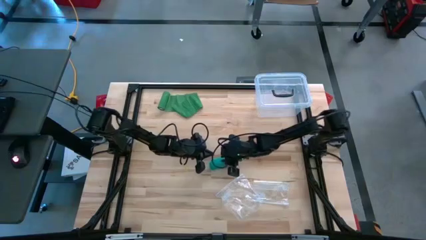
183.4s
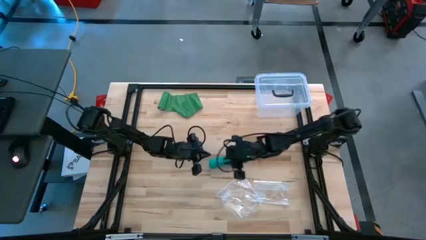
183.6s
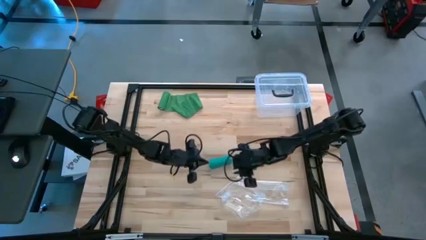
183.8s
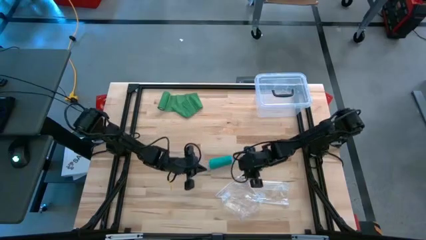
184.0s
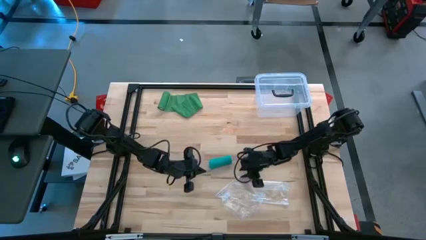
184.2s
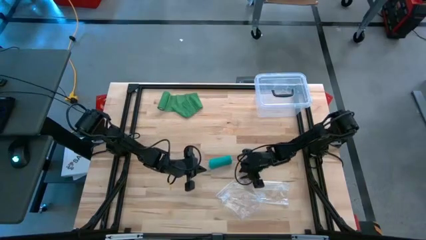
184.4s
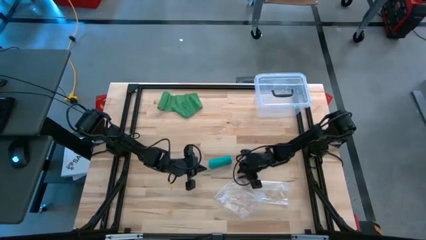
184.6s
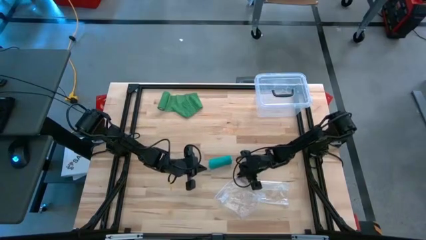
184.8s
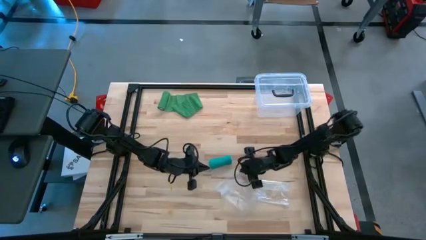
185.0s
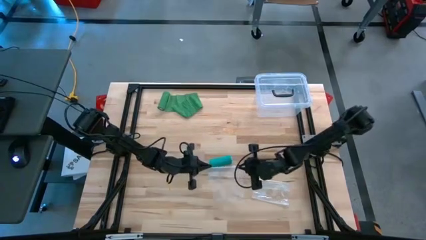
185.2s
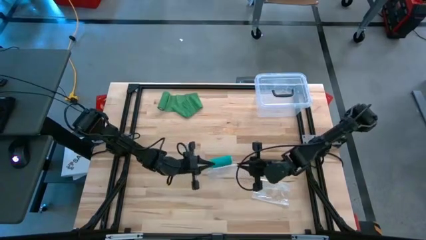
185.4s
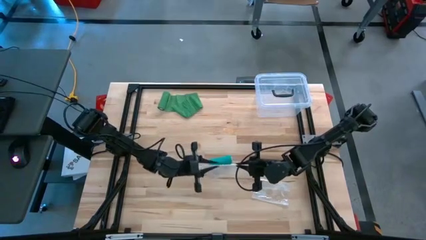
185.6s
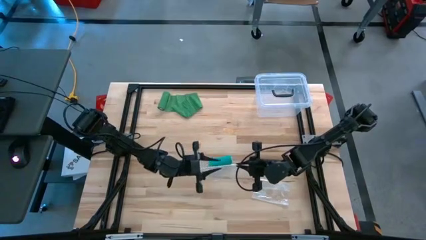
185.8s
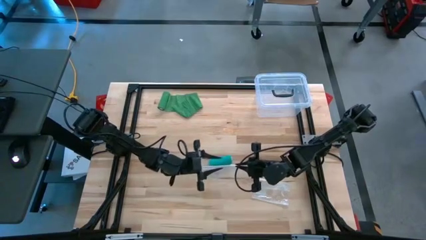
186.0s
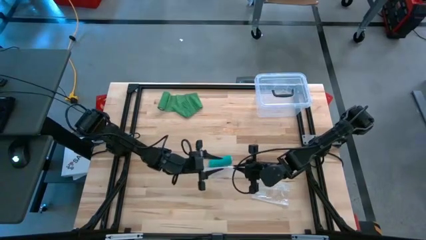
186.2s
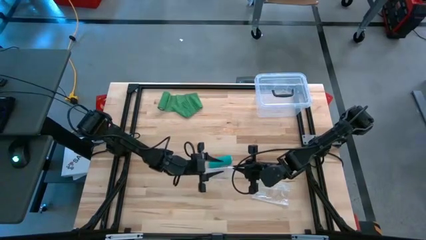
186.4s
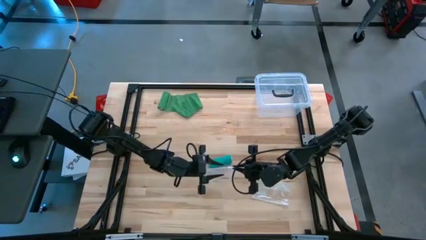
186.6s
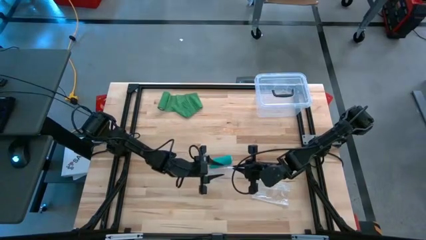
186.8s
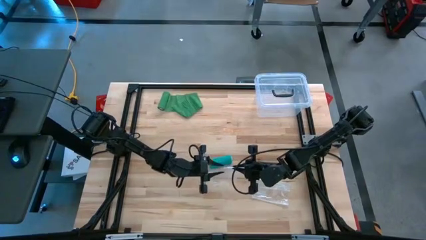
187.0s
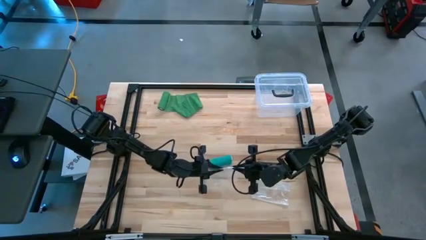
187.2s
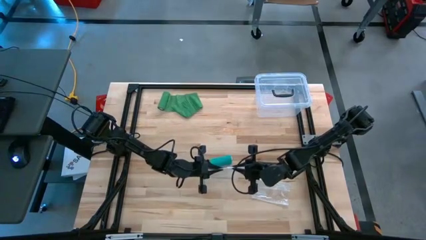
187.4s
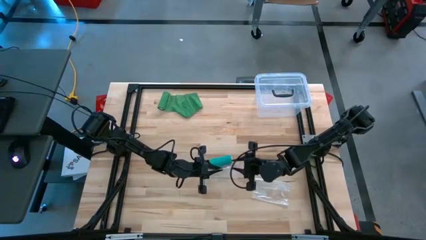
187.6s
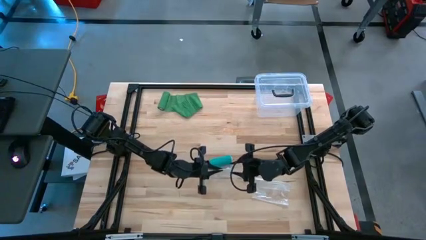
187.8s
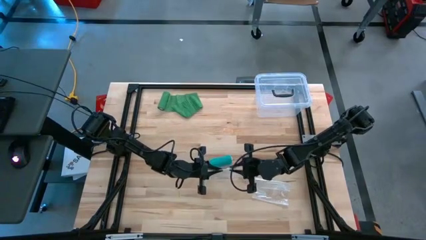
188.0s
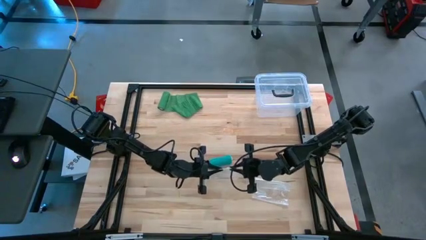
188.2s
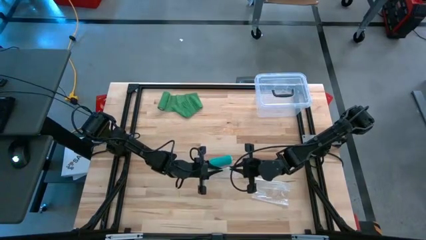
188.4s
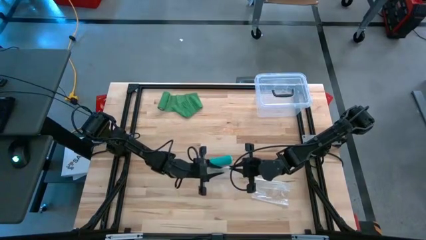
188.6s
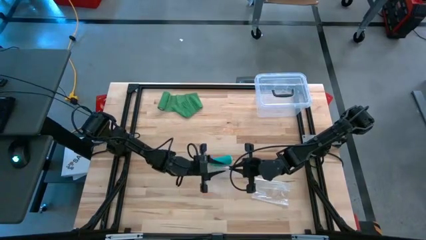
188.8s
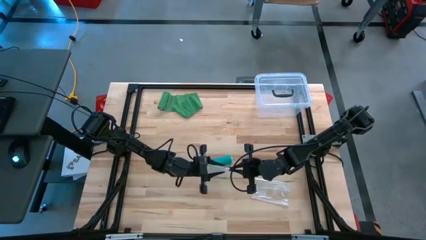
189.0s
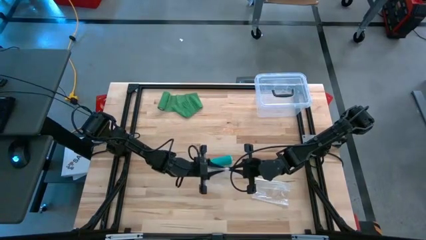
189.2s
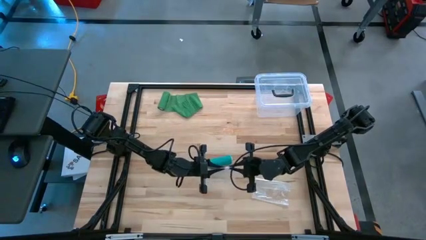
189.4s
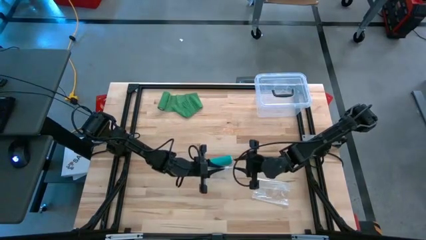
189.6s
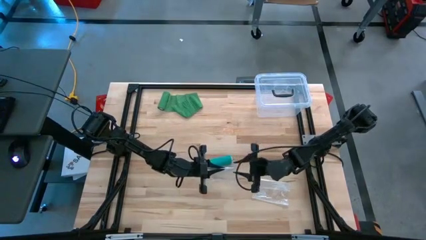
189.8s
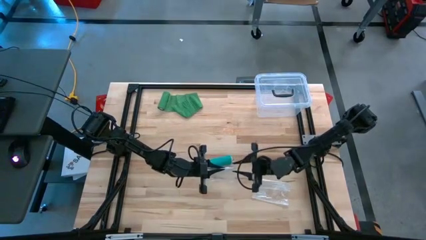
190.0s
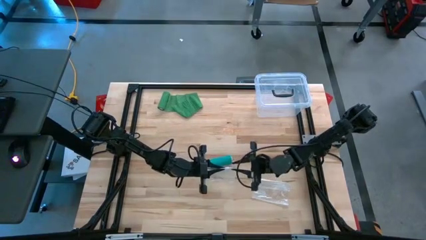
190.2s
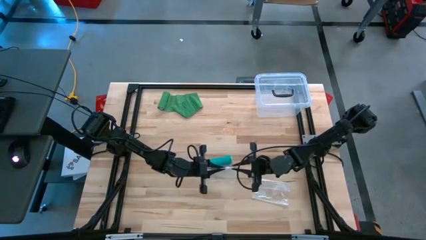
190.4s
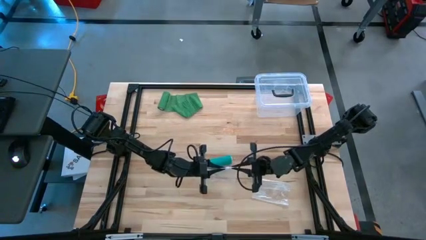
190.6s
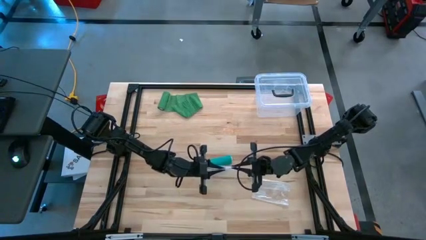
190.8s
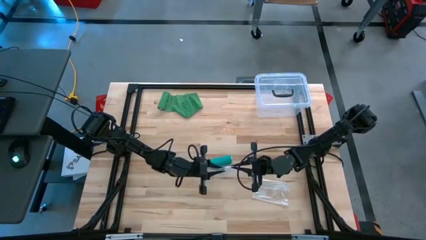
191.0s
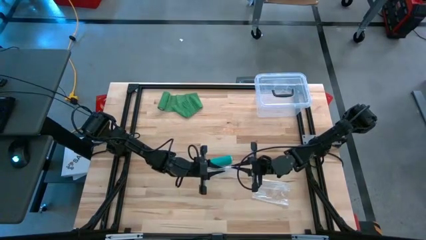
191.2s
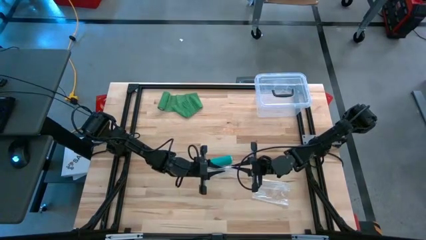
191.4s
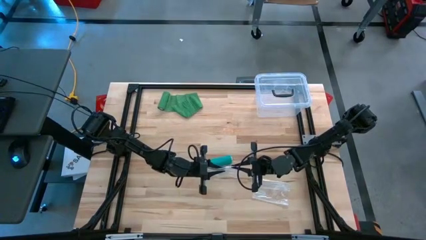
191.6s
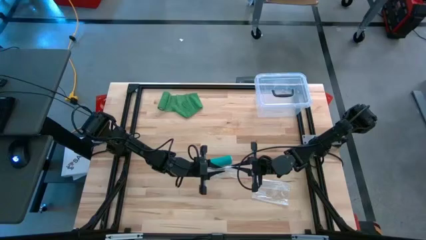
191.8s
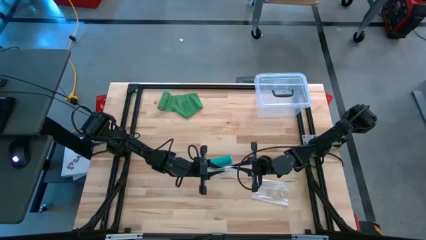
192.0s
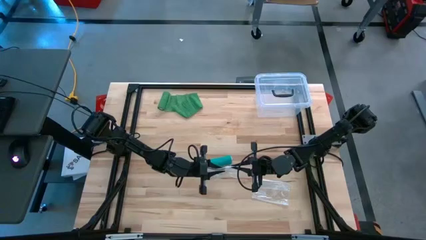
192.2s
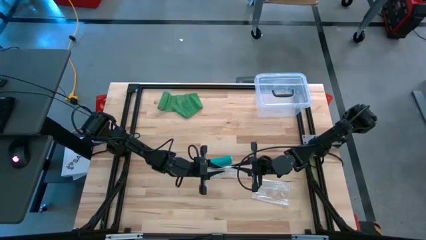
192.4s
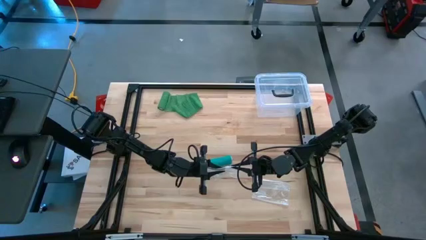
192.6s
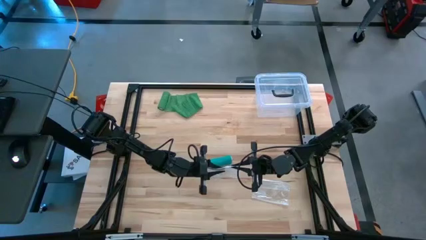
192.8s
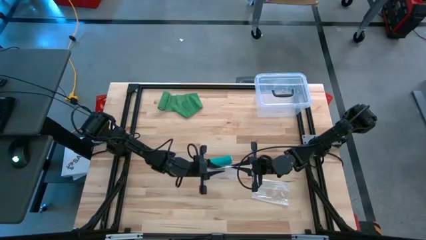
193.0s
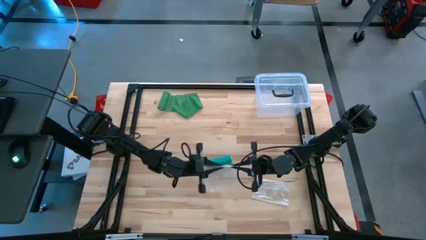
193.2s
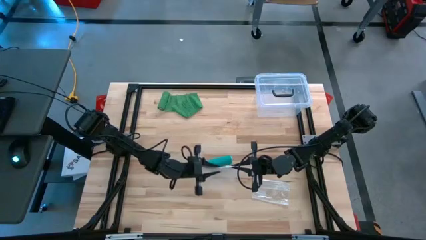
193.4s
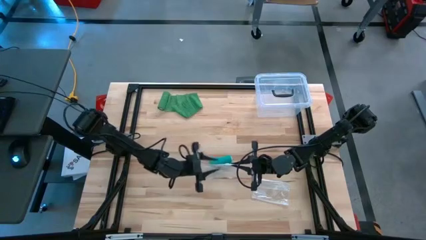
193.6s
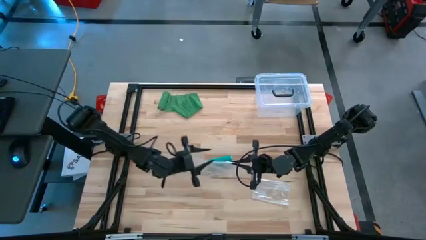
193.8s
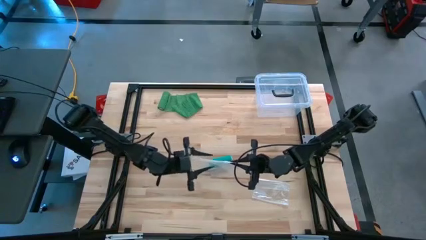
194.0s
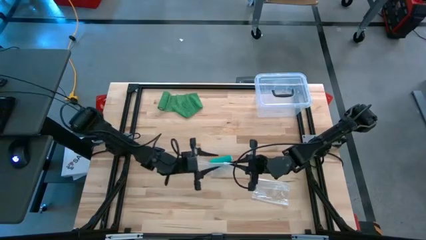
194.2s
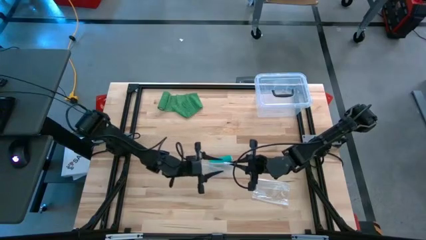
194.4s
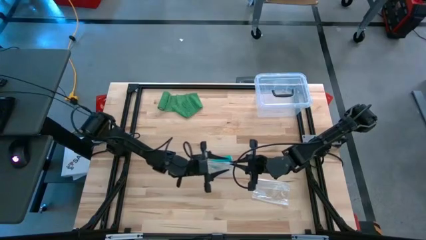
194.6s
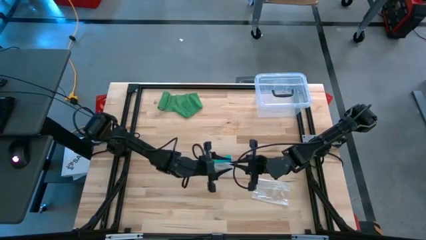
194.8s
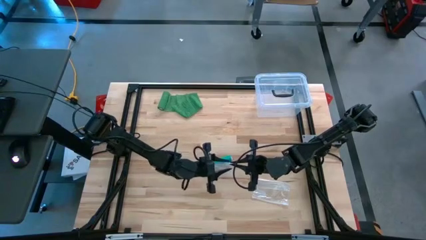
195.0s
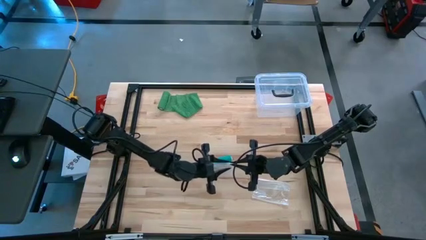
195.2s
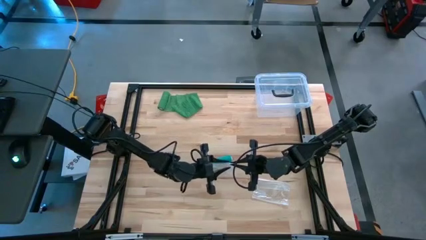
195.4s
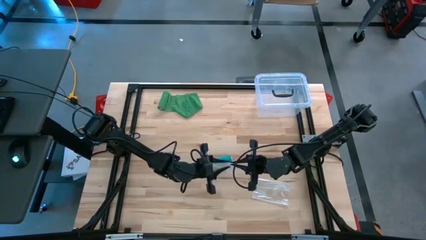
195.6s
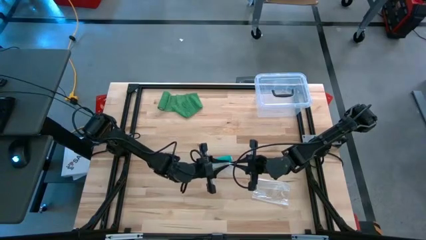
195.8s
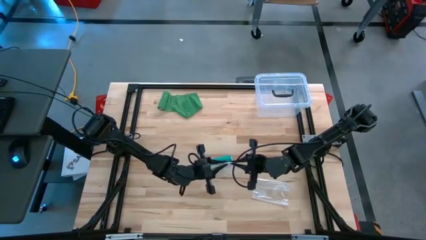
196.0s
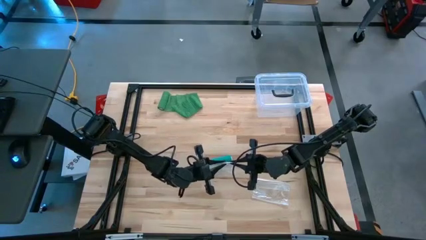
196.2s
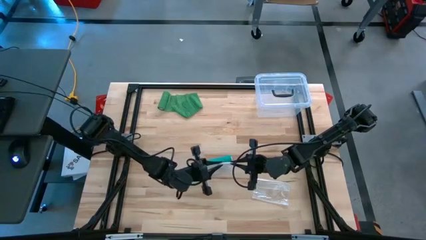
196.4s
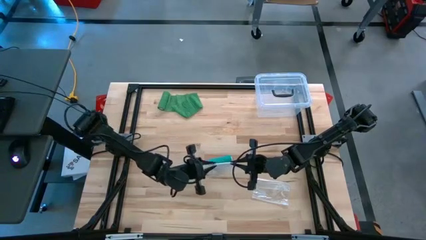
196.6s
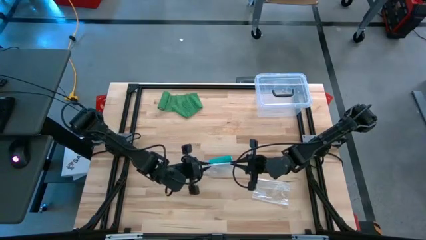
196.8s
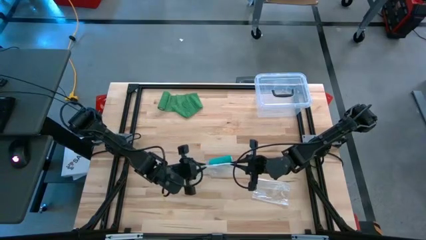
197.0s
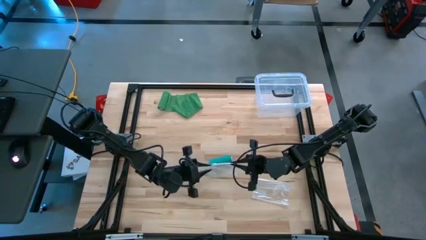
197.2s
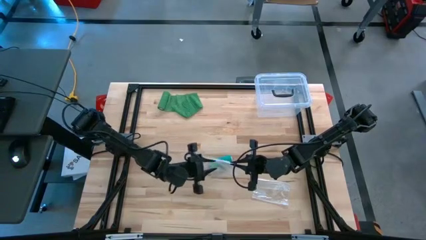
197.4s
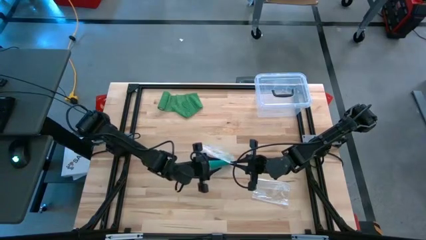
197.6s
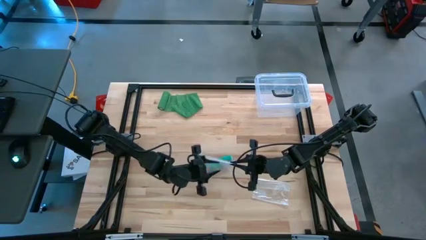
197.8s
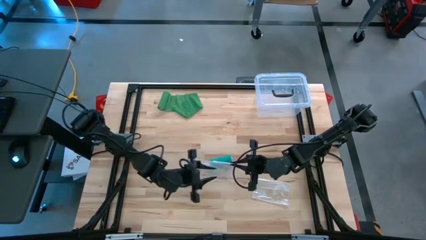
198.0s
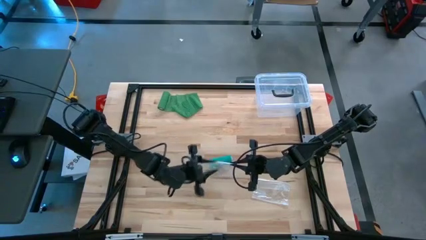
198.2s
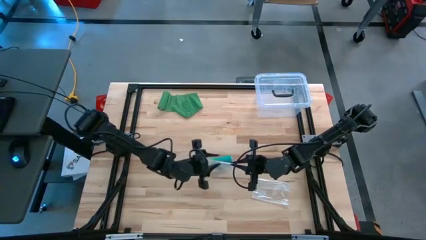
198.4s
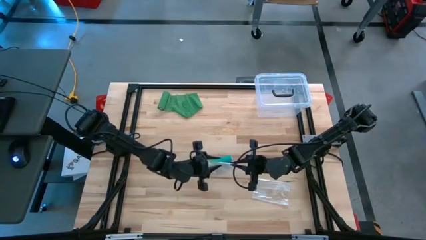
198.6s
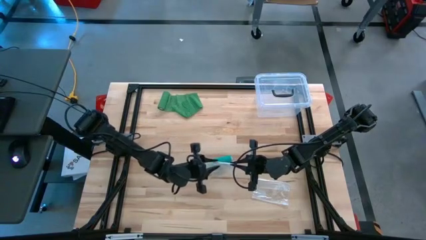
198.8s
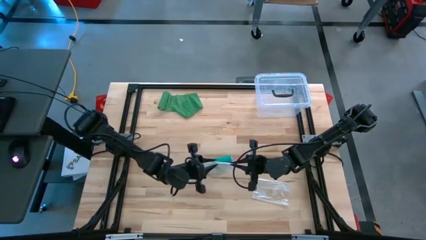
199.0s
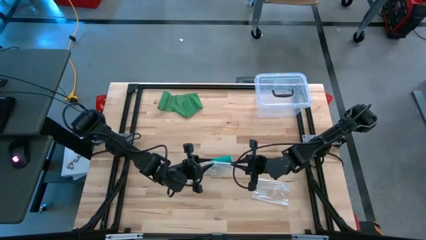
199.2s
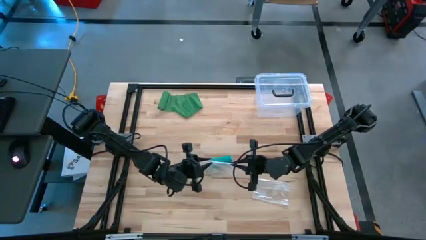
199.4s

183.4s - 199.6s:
Task: Roll bandage
Open the transparent zip bag
